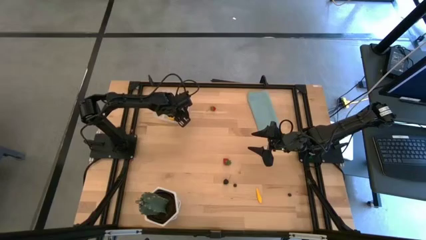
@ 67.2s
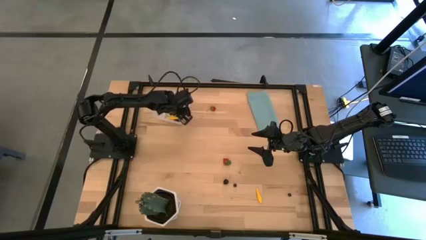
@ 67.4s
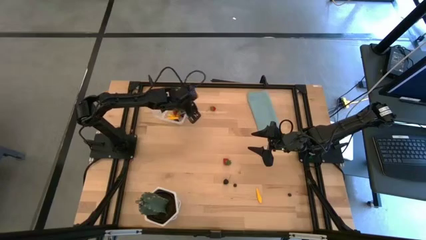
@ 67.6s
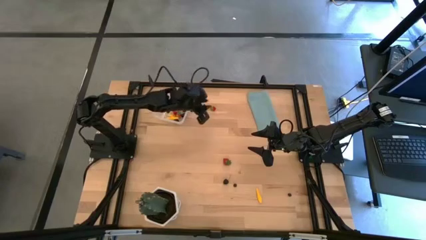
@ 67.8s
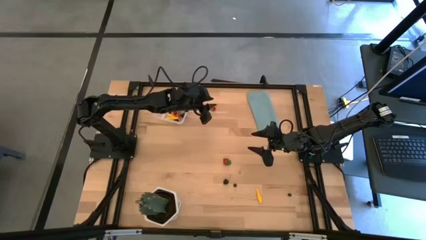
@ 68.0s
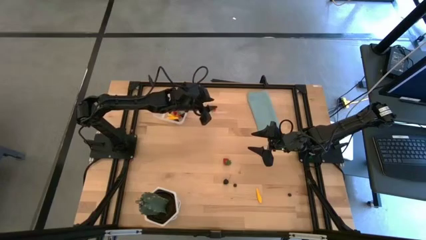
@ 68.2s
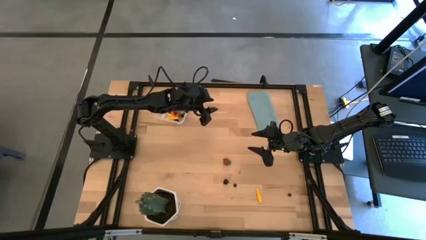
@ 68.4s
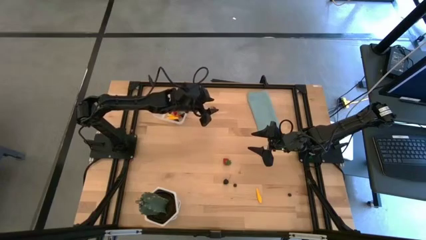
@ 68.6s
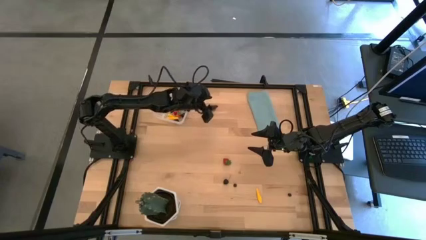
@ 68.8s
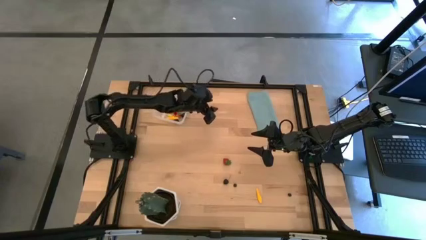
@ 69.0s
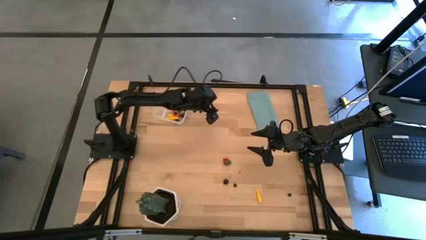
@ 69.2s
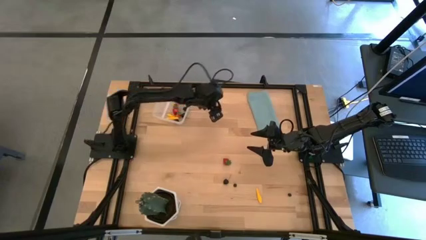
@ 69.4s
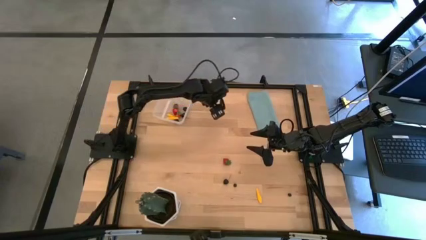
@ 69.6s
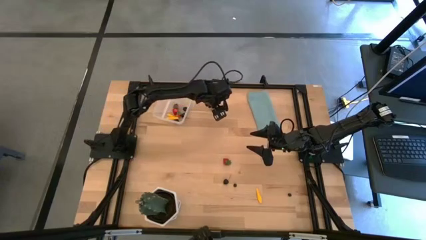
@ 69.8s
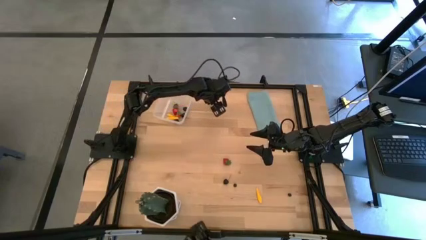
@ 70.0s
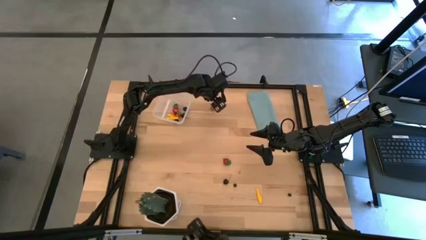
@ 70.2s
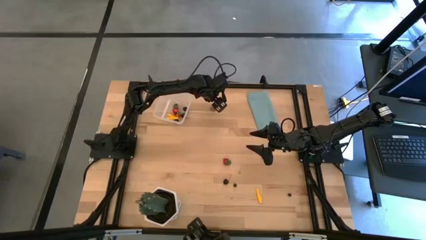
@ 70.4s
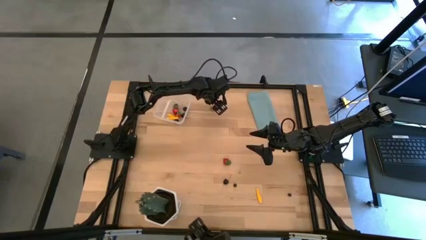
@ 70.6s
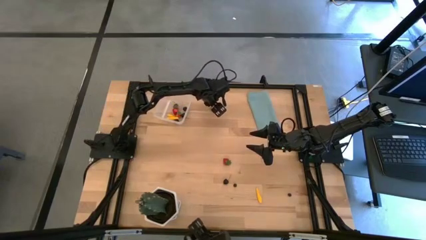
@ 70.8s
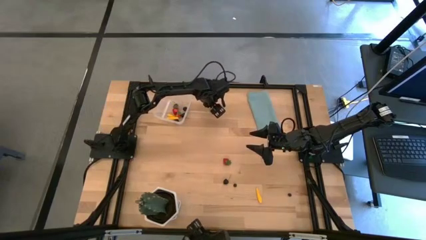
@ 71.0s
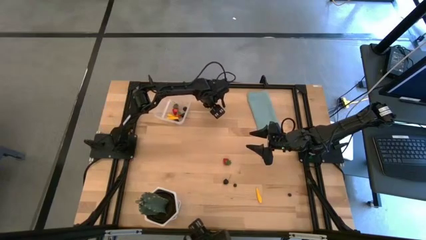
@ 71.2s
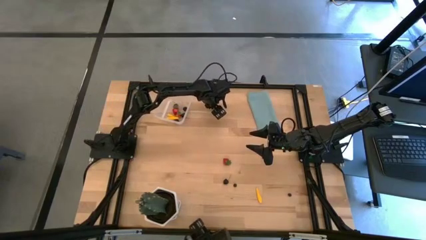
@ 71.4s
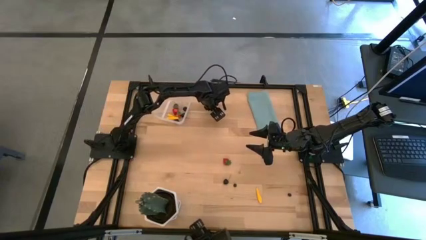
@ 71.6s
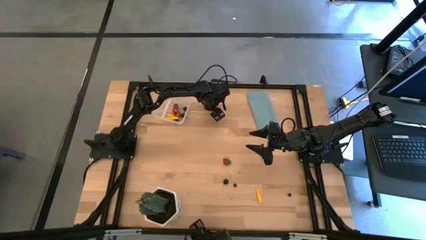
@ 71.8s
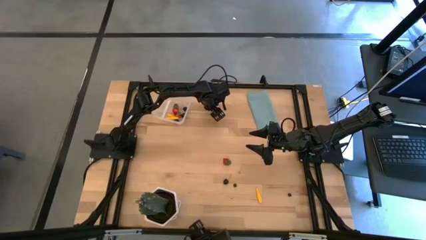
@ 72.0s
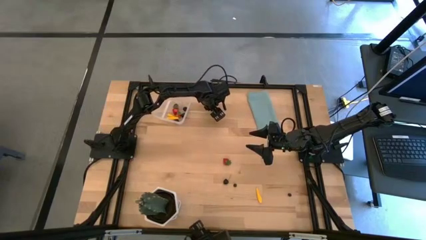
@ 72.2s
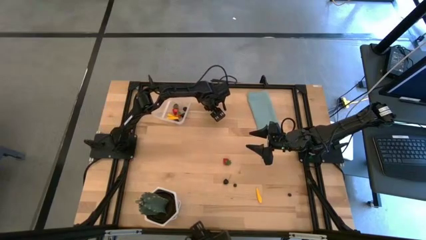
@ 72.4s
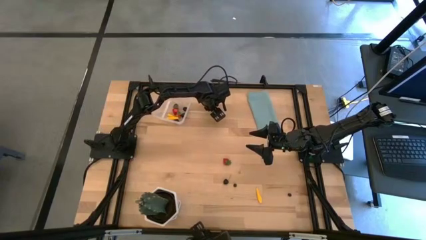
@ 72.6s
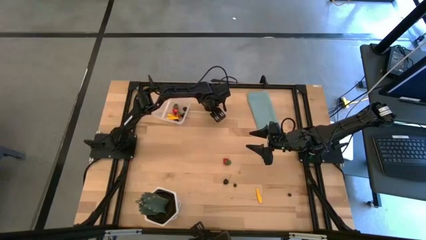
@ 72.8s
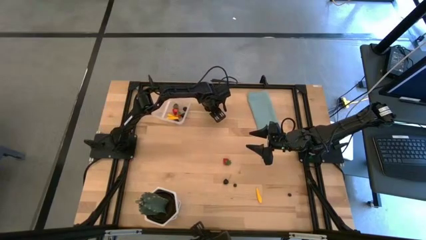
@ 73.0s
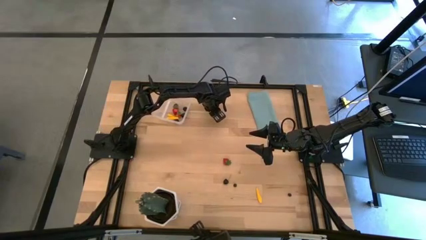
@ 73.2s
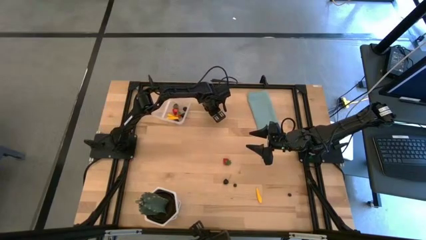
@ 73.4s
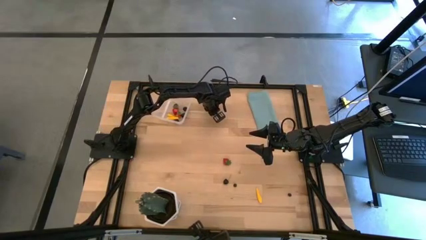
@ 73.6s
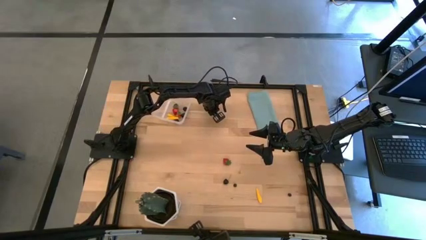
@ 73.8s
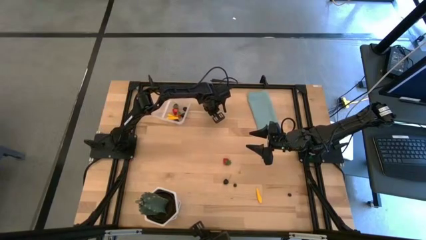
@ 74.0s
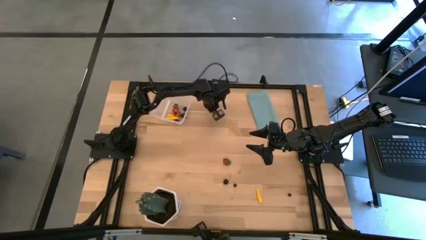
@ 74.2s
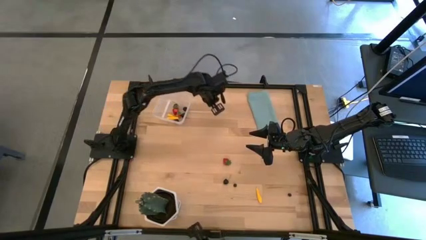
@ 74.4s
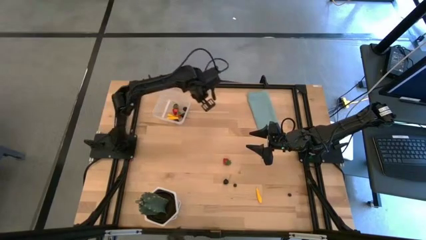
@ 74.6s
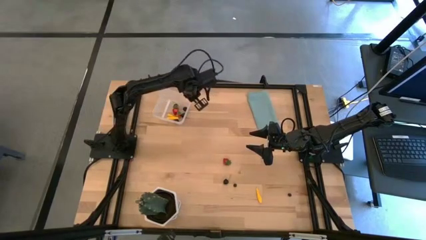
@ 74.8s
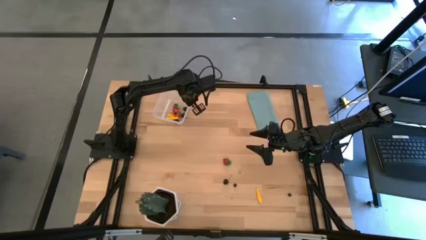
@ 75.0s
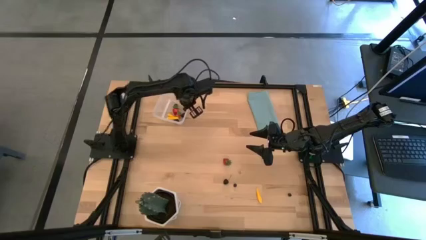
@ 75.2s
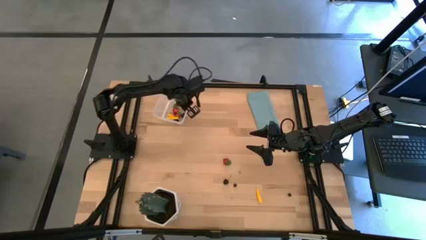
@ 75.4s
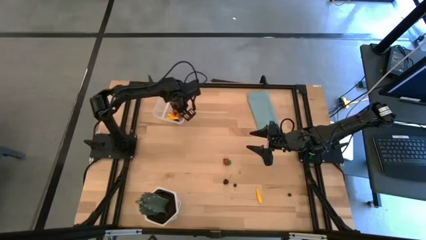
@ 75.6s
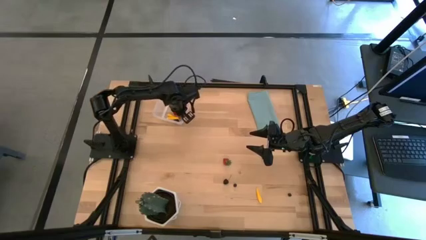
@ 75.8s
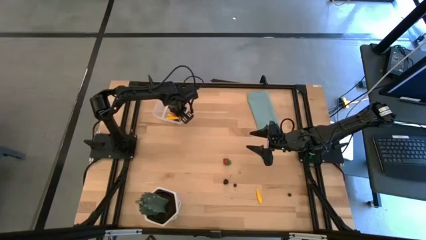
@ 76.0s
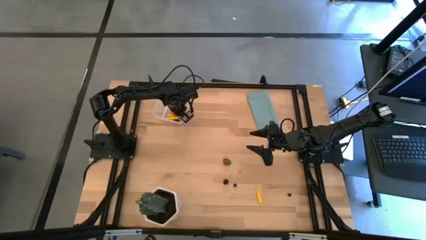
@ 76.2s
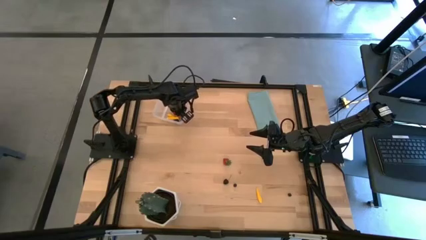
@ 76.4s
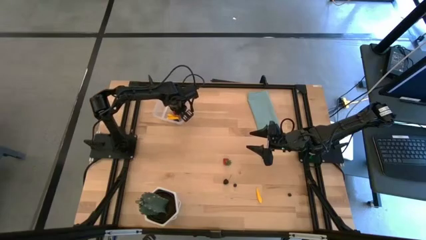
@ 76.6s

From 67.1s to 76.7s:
Task: Pick and placing Produce into tupperware
Put the red strawberry into the transparent bin
